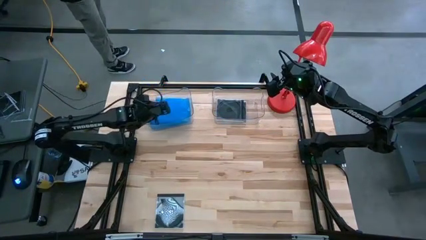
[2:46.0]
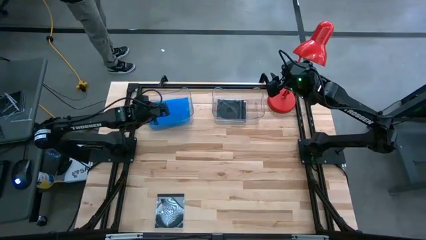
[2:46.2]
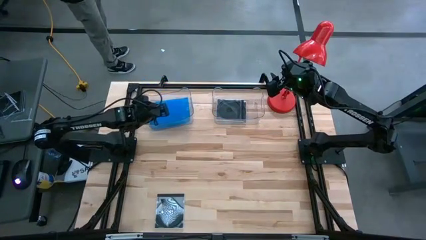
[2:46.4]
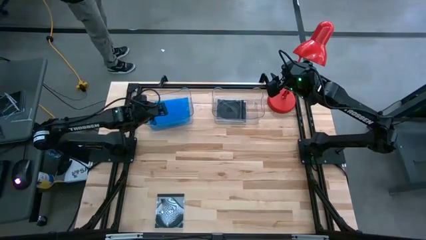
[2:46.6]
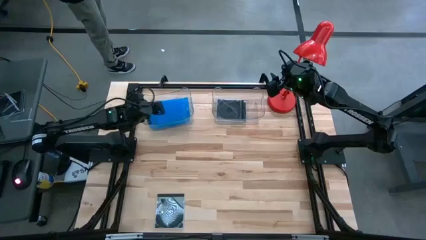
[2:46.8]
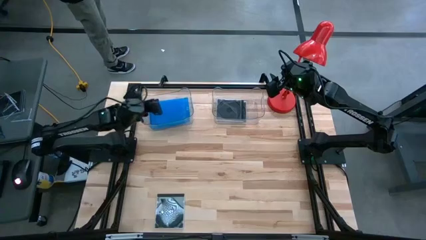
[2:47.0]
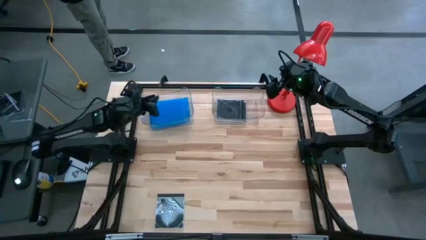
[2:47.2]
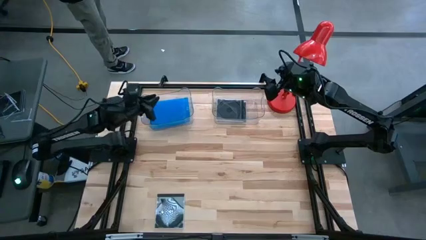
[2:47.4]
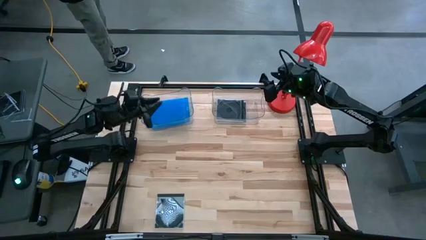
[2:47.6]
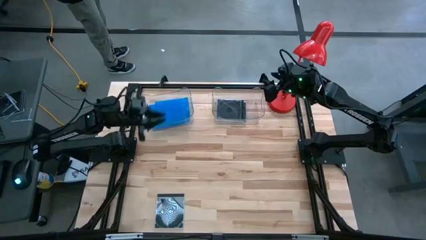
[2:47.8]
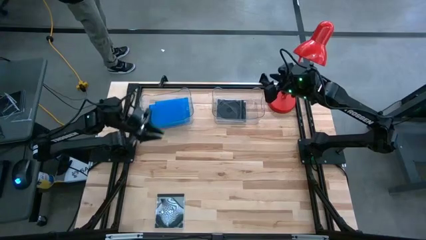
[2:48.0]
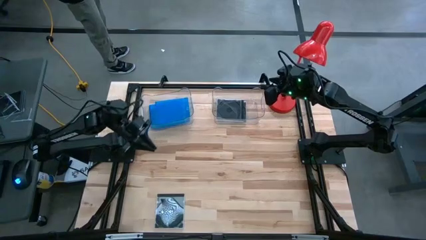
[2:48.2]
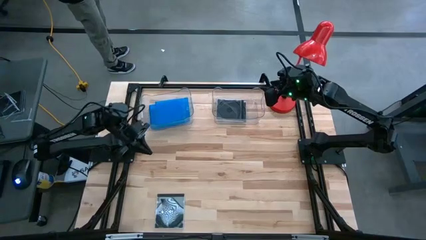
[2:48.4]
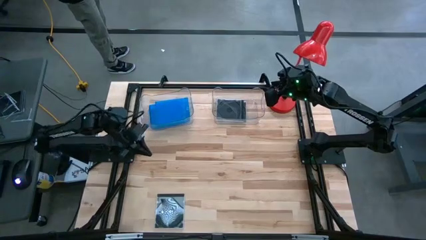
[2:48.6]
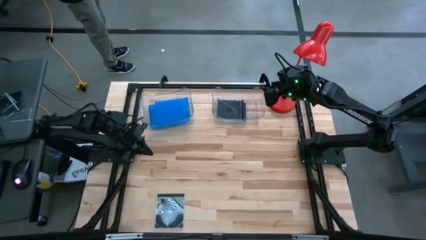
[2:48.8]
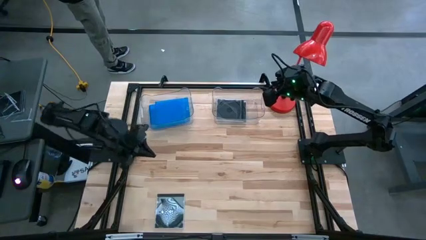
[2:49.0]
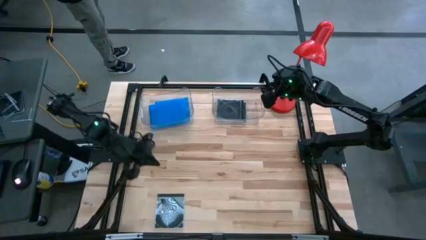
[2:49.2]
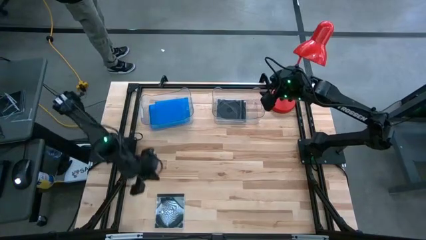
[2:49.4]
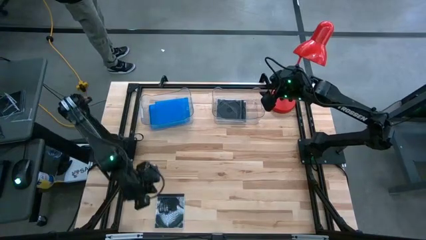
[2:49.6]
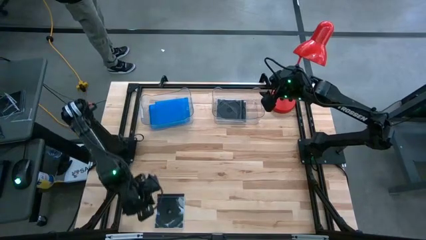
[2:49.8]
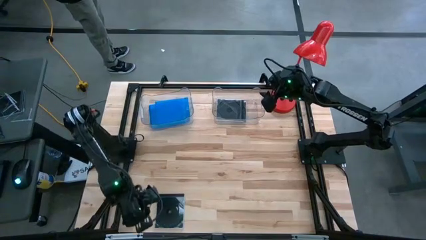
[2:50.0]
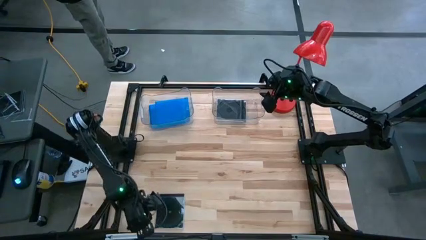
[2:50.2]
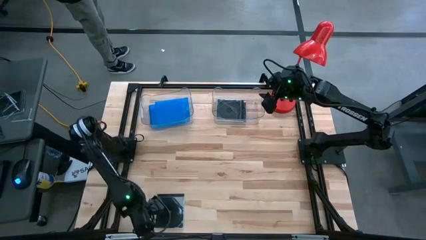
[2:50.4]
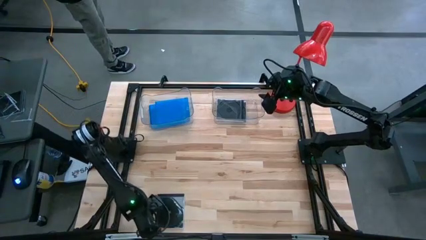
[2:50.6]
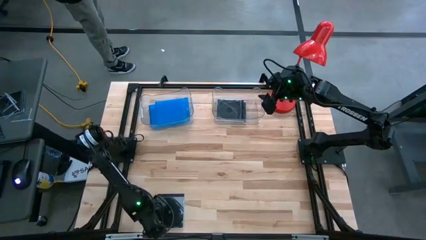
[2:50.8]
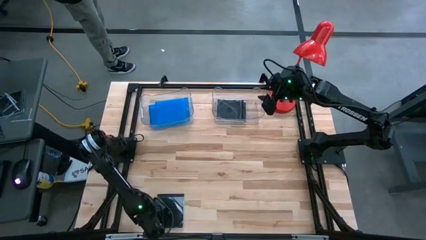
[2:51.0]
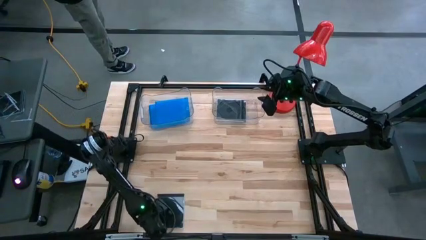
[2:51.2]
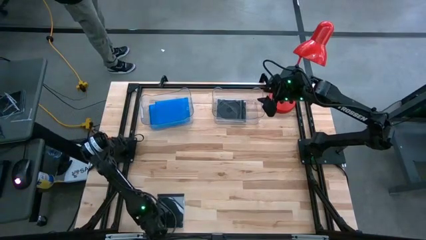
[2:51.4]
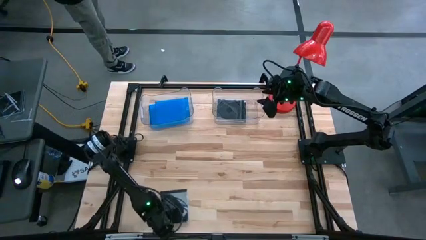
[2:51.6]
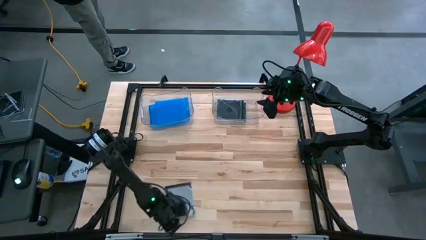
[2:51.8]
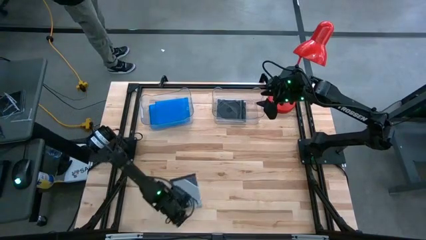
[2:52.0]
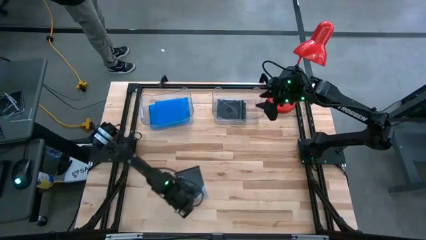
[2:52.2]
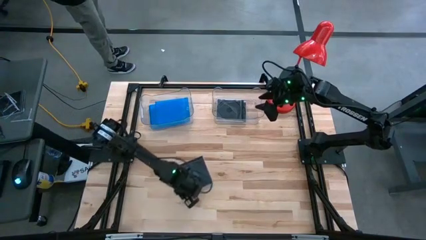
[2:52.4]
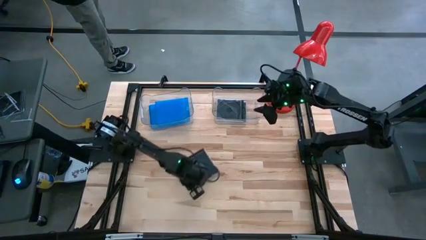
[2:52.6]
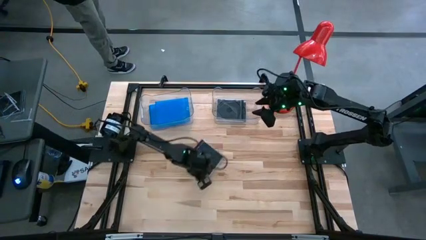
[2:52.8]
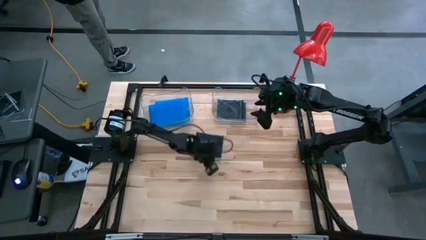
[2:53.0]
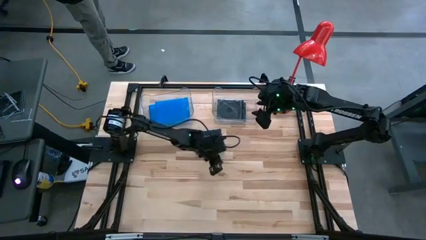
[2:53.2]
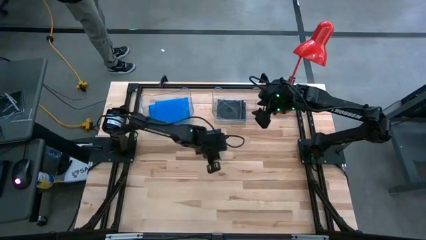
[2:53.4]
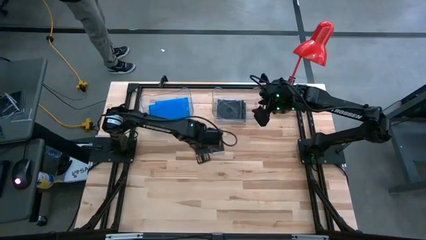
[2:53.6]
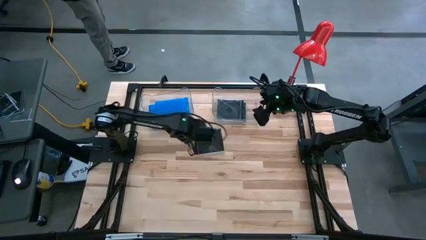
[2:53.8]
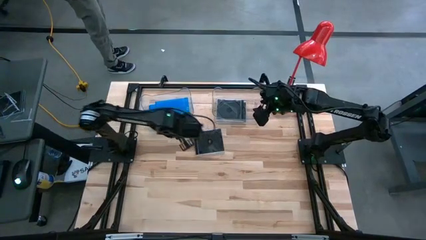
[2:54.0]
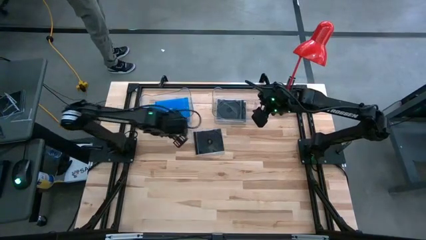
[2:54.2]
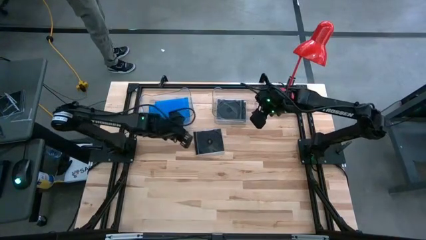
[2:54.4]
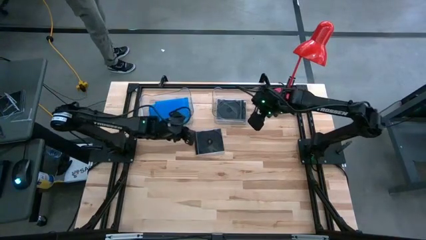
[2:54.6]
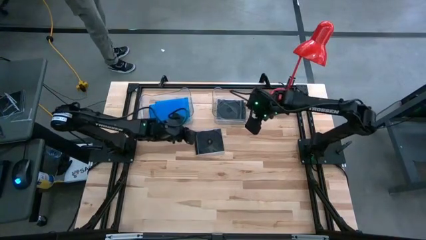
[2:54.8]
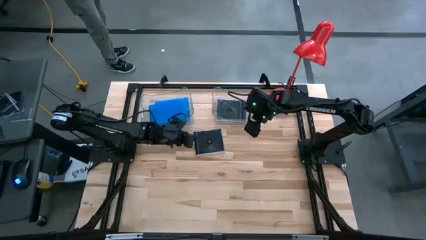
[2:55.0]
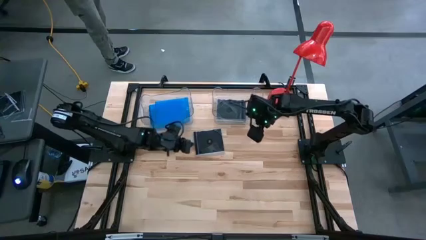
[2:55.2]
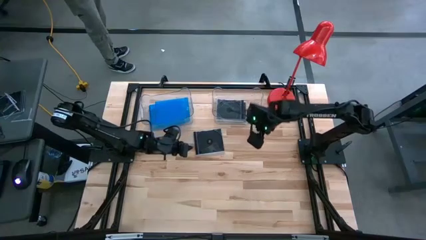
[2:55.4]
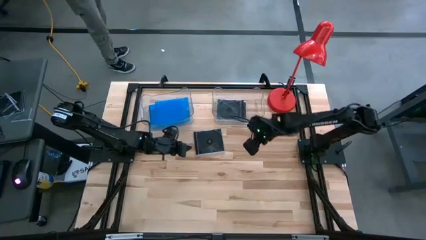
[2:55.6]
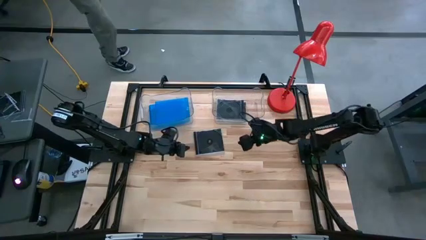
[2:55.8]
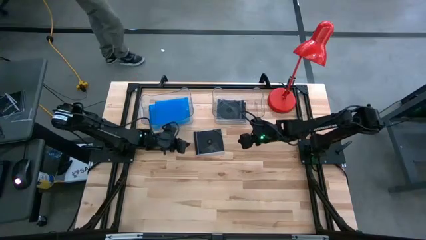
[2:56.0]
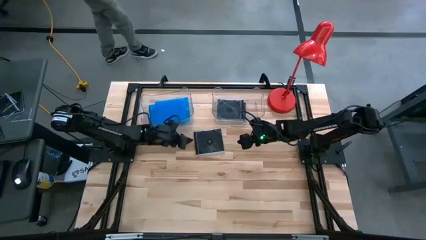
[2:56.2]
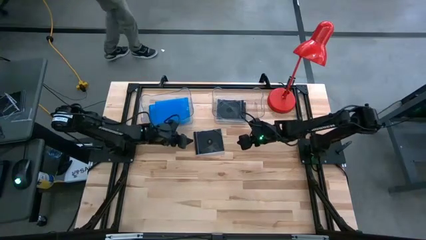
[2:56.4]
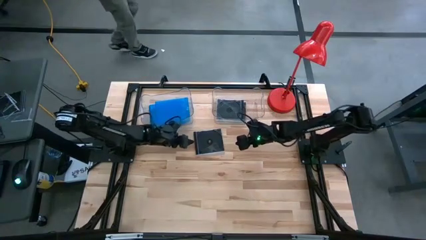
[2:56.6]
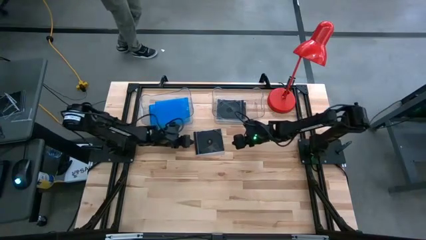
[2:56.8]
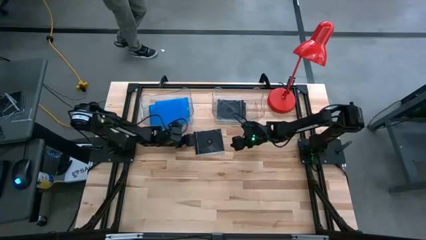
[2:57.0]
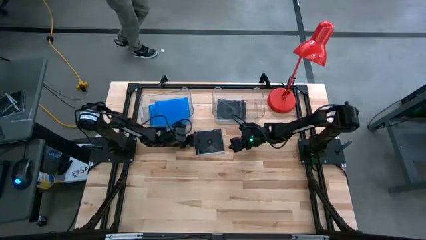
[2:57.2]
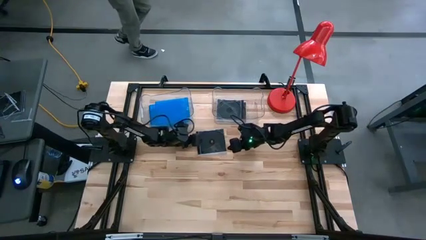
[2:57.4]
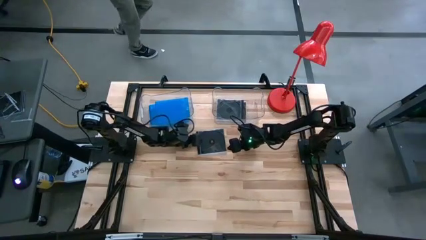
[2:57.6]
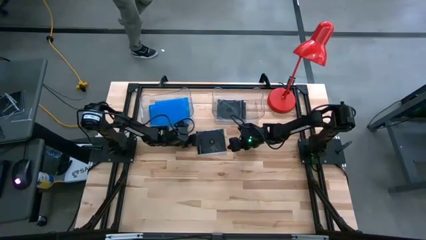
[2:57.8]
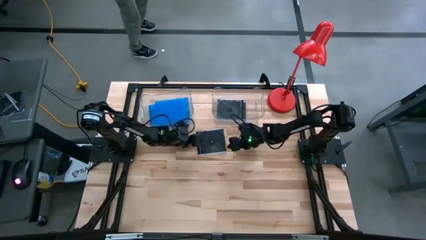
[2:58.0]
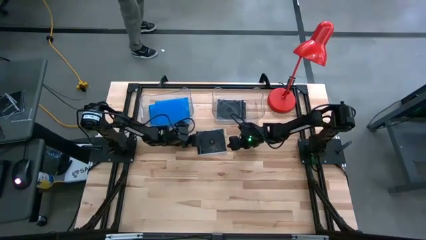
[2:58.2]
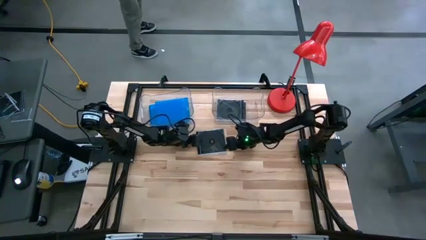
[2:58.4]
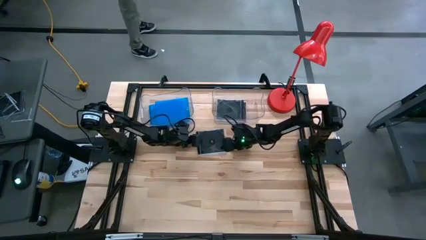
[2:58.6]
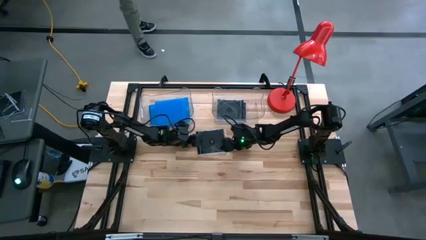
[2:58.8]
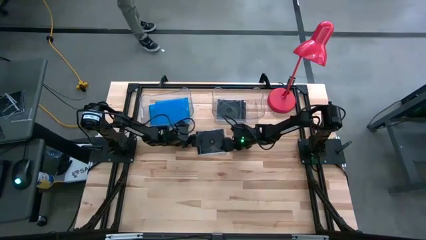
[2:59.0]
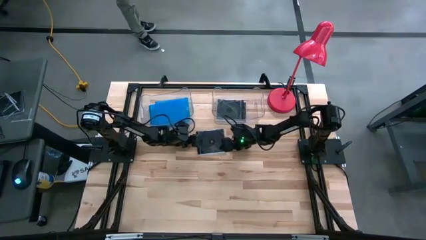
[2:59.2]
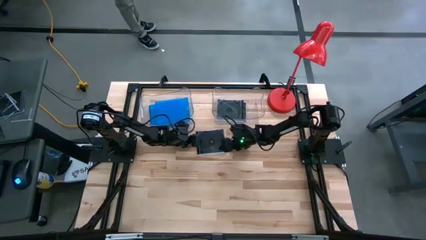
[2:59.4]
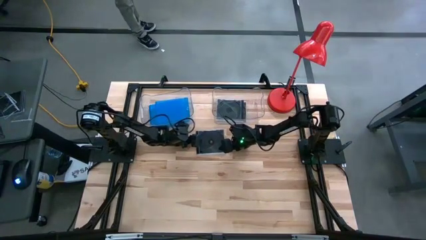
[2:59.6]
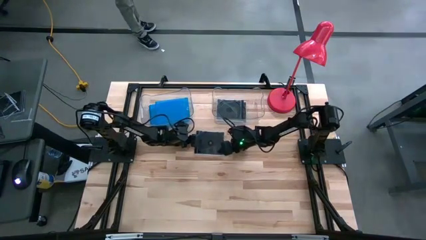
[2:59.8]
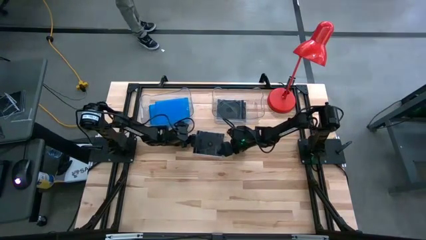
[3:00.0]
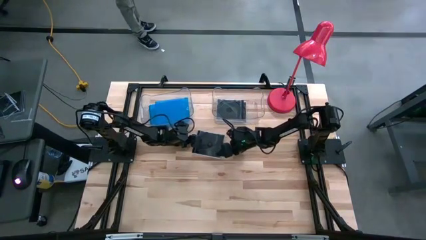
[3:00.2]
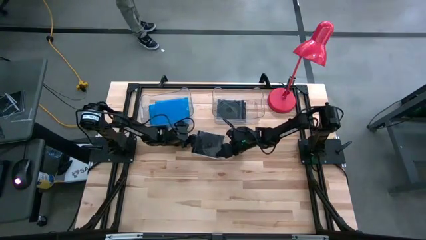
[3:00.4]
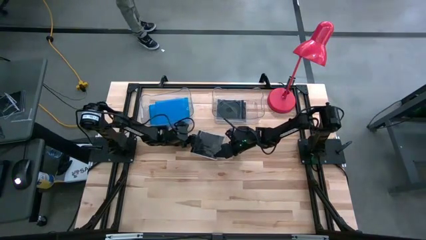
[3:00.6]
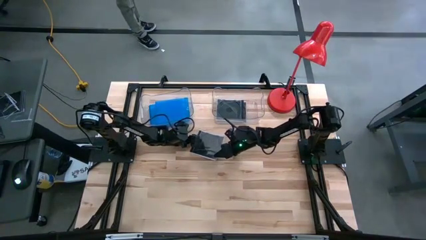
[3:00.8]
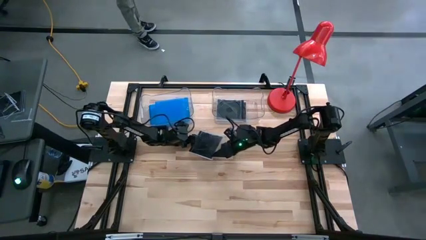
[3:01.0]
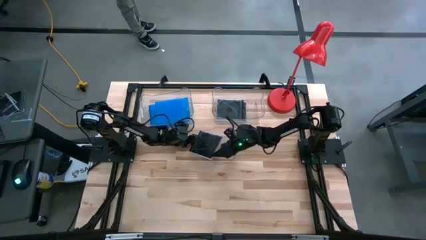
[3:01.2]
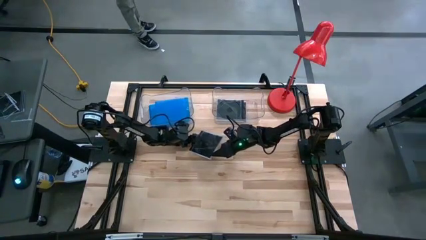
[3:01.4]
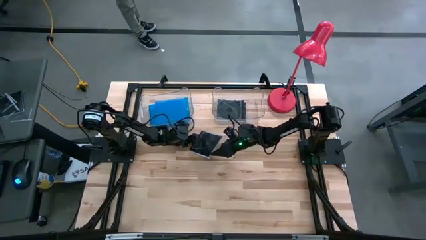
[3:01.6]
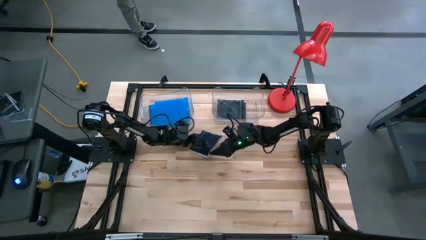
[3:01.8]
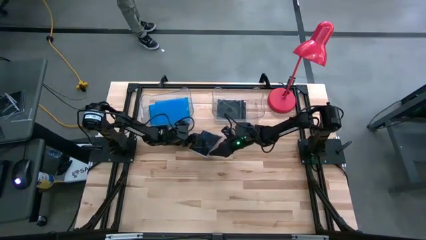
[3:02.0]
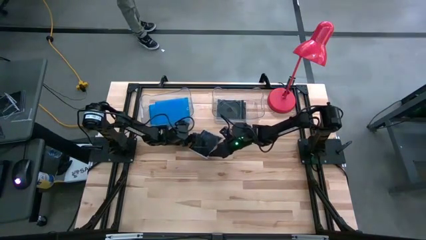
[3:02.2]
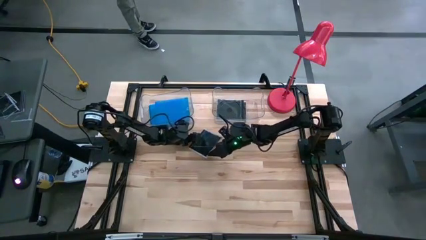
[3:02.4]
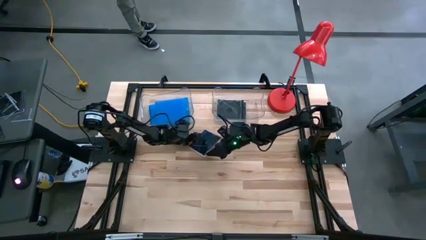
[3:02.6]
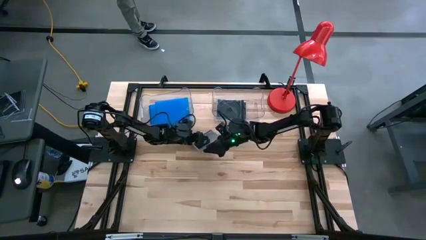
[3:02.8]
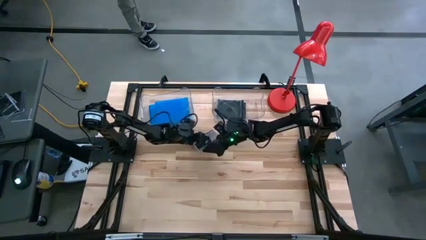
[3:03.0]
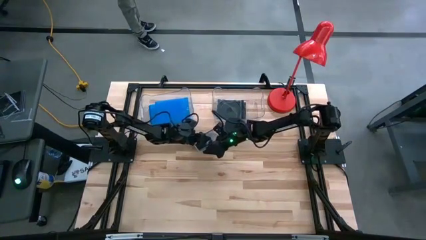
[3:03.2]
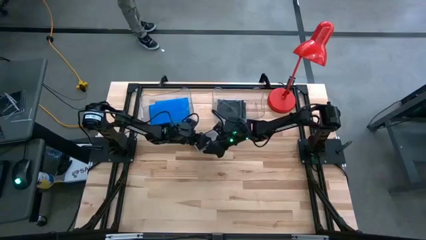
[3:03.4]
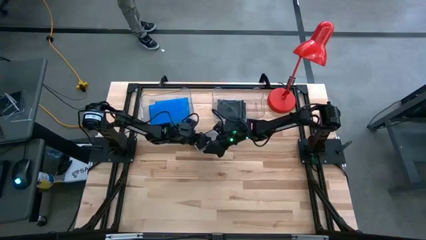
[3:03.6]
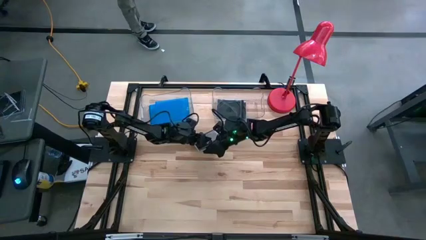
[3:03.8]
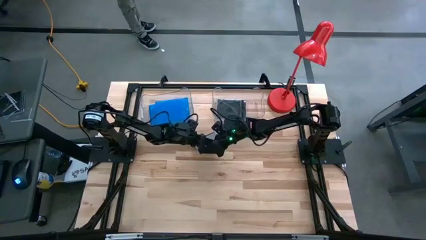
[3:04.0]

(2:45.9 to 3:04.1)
Task: Pick & place jewel cases by type
Put the black CD case into the right transparent bin
